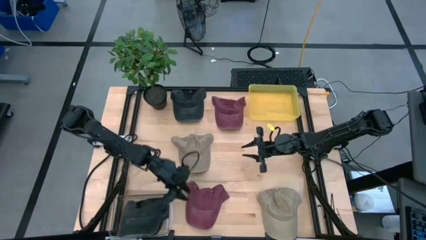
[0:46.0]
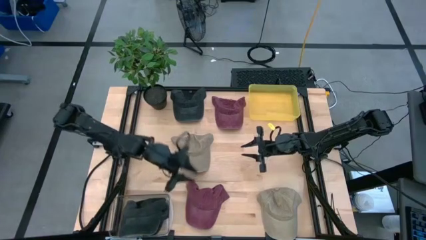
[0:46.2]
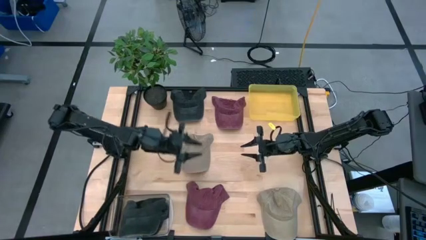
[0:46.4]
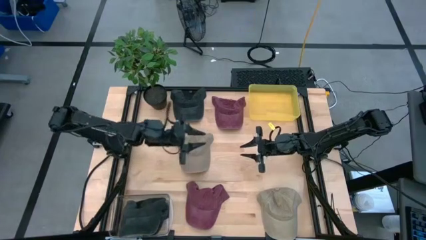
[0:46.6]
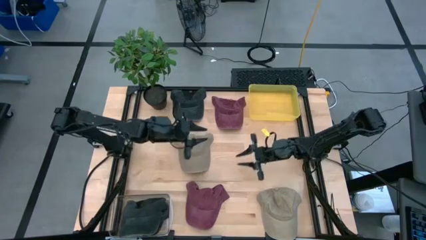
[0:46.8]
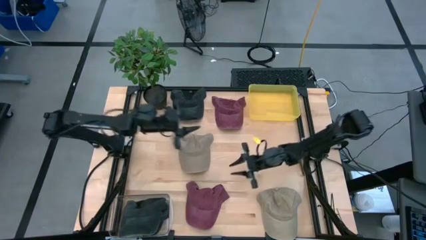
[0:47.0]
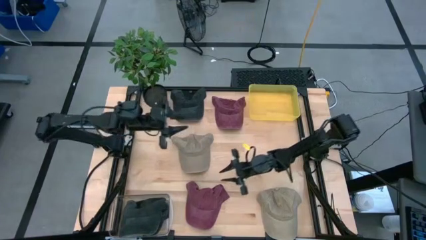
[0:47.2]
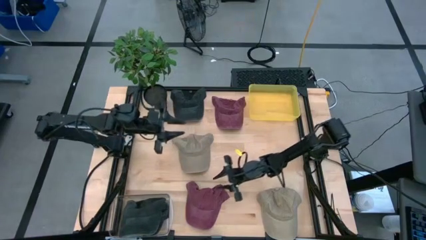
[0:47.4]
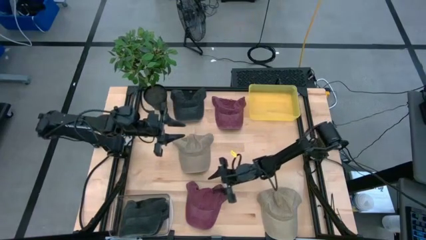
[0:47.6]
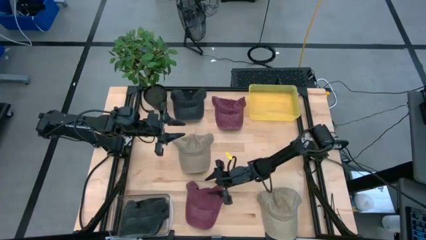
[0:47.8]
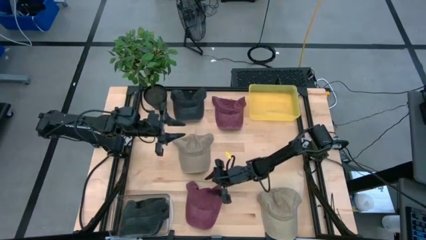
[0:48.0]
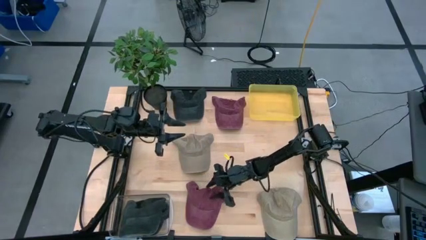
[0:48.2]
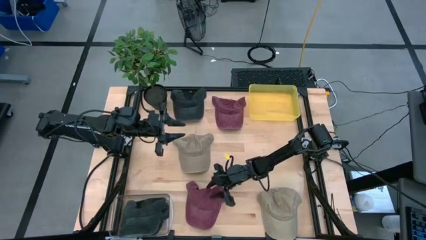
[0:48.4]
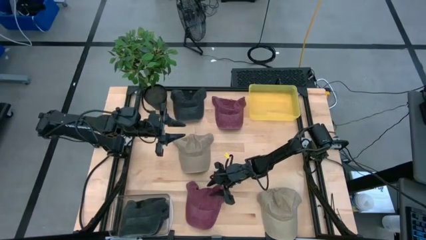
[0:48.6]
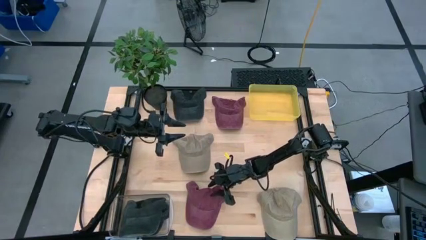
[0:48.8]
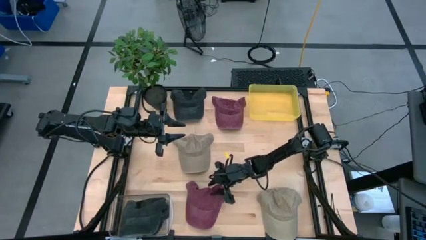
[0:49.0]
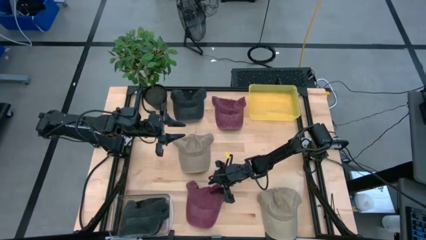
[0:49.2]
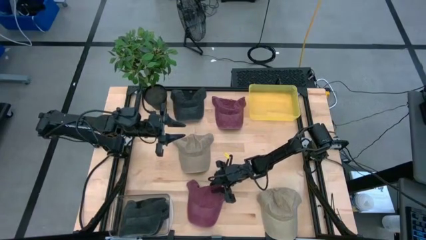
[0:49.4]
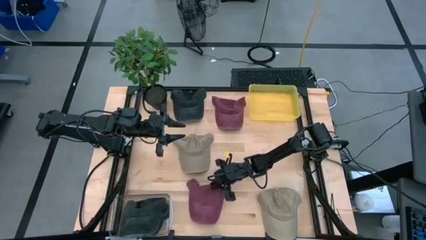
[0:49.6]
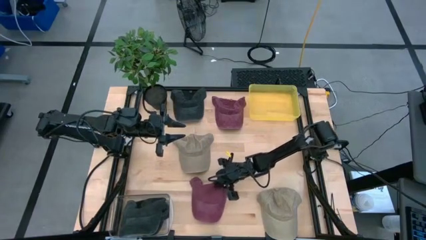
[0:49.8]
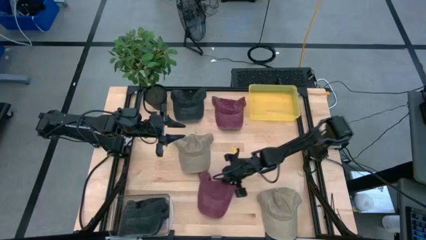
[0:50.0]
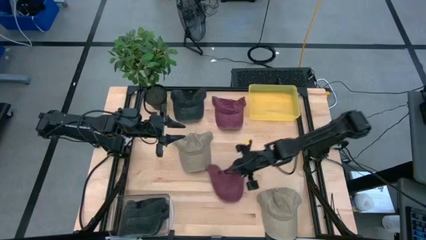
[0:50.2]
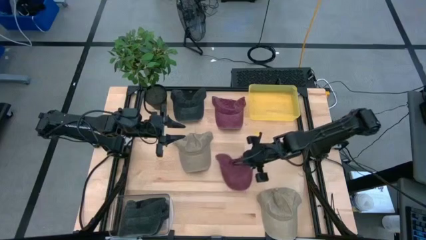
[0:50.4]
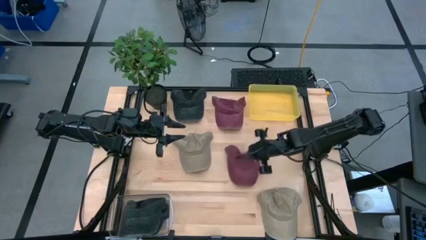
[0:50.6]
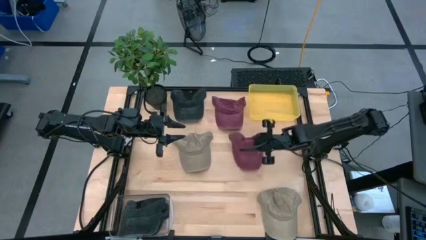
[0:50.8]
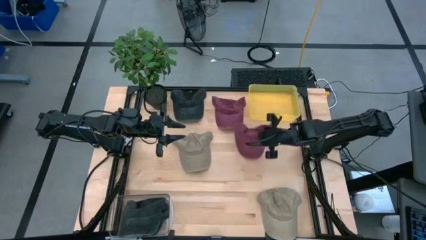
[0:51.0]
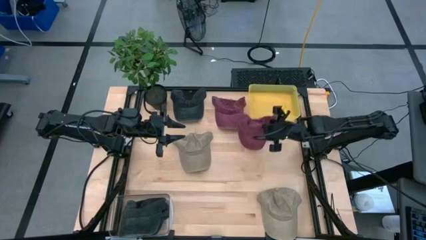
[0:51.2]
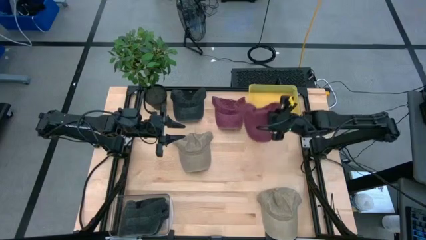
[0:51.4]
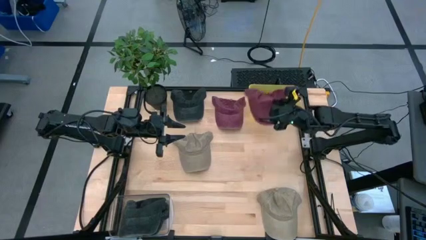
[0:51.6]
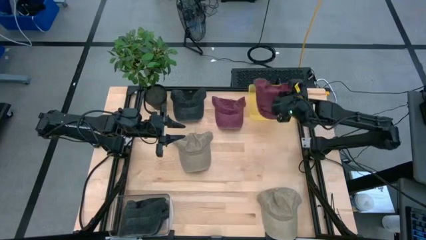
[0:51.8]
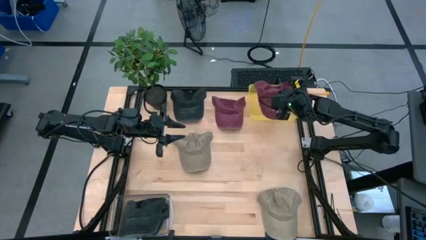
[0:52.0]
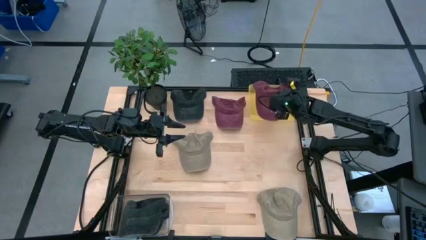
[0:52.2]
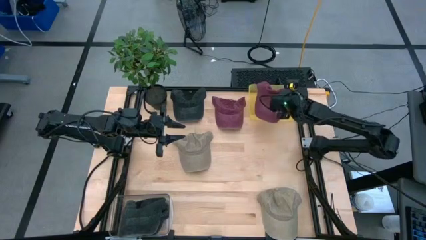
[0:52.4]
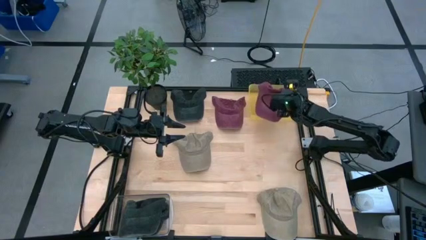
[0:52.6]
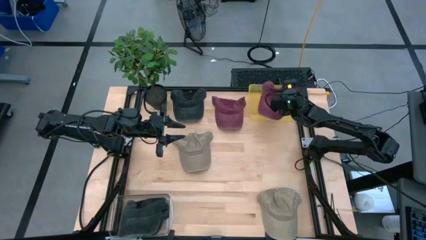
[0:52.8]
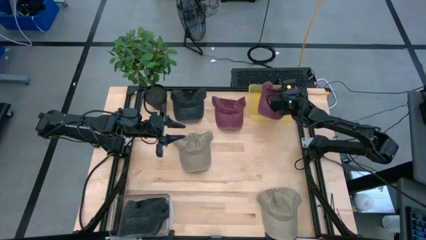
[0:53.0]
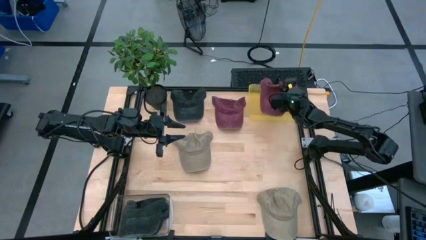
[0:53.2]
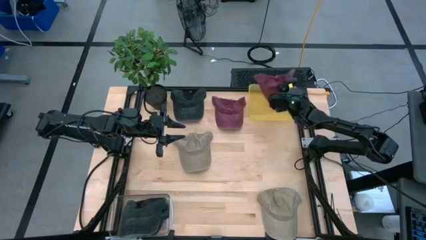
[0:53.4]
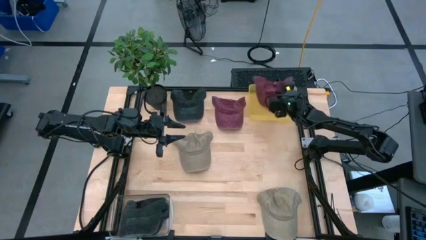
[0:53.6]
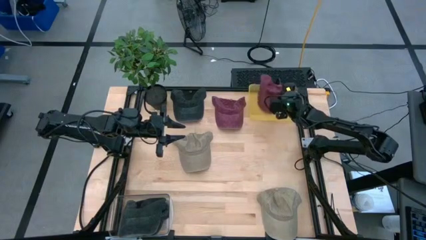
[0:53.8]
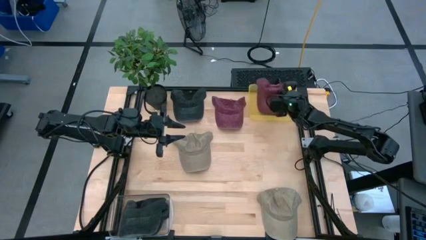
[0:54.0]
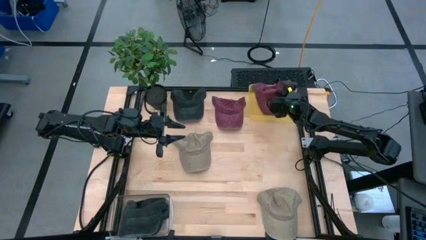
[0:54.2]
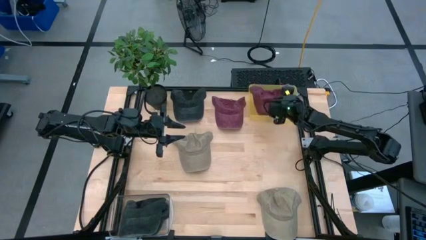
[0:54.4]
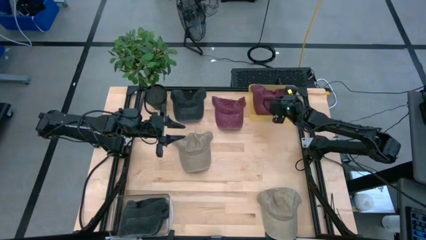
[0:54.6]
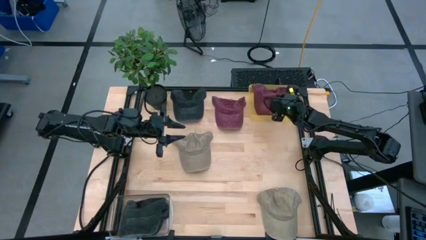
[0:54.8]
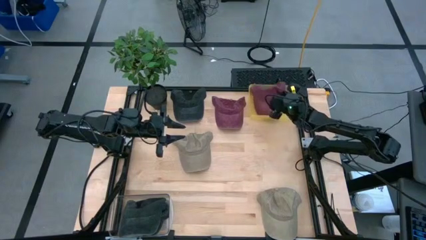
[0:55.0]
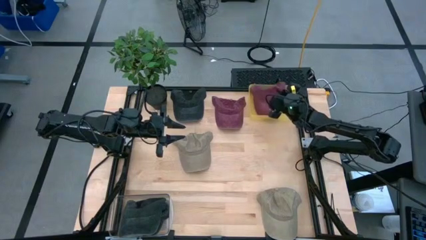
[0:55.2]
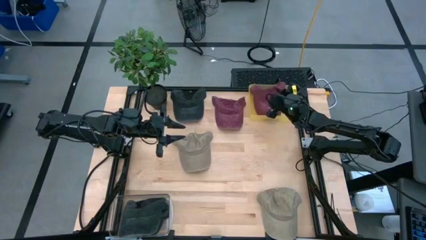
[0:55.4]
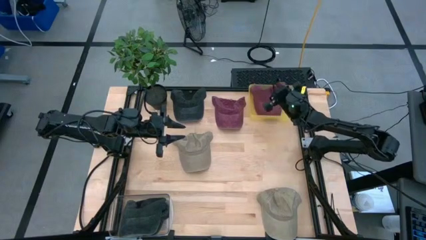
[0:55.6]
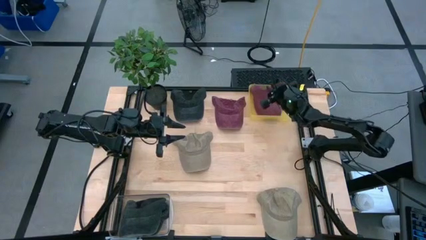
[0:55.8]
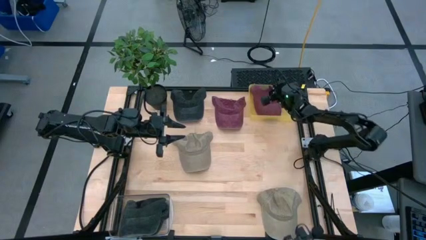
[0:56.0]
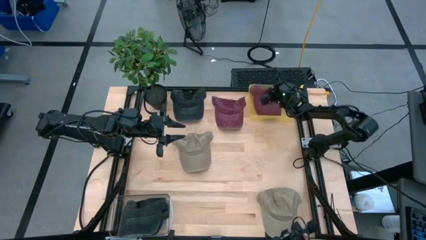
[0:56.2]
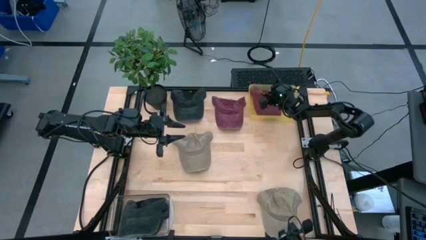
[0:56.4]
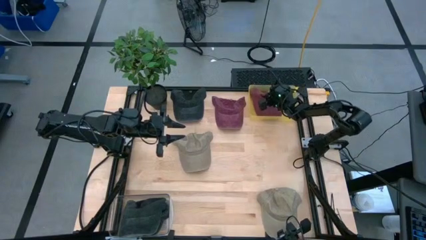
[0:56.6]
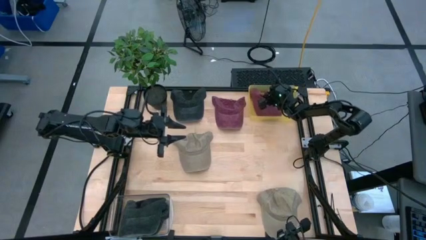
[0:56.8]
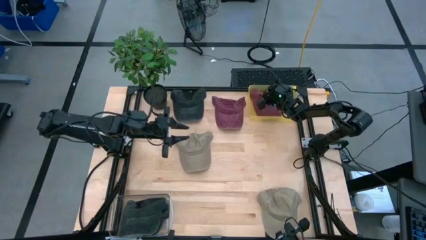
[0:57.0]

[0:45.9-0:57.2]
Task: Pick & Place hat
Put the bottom red cap into the yellow bin

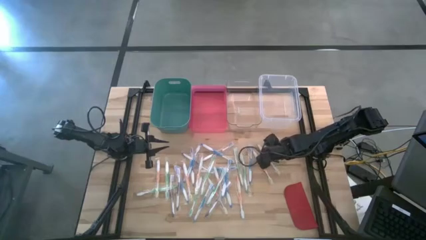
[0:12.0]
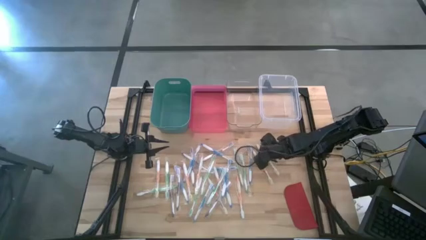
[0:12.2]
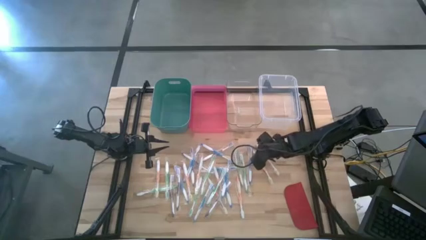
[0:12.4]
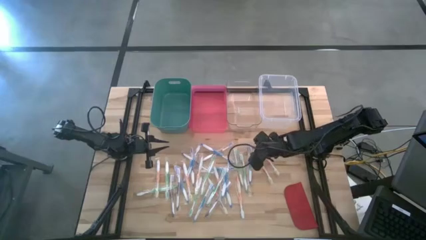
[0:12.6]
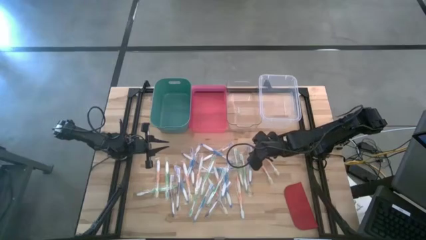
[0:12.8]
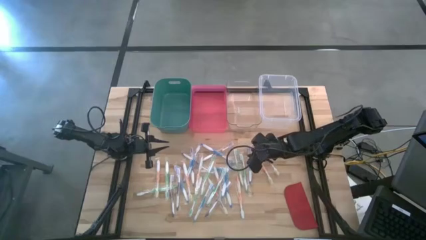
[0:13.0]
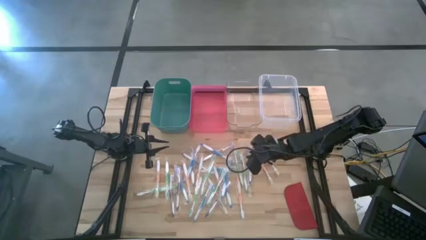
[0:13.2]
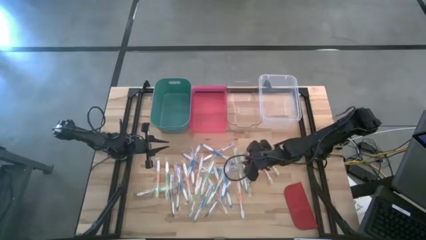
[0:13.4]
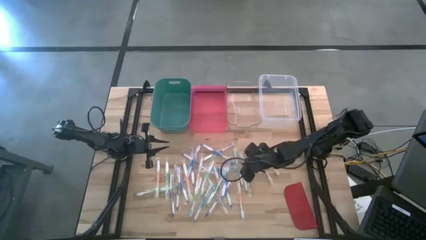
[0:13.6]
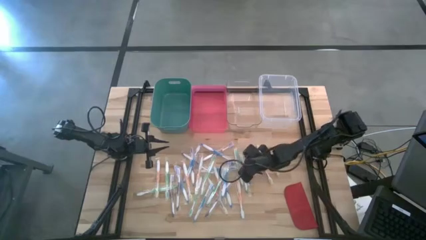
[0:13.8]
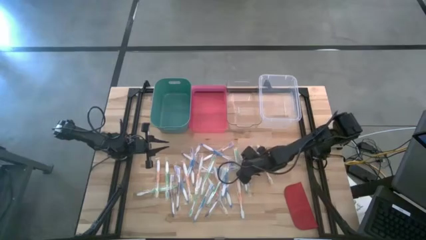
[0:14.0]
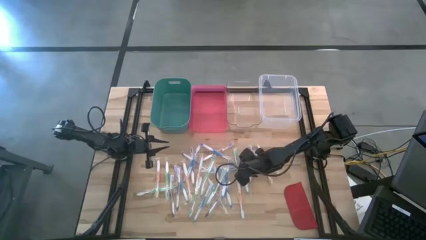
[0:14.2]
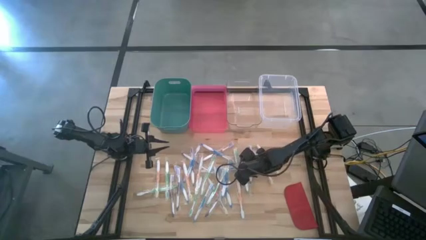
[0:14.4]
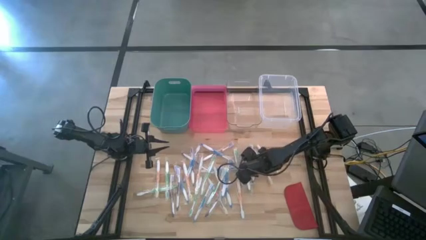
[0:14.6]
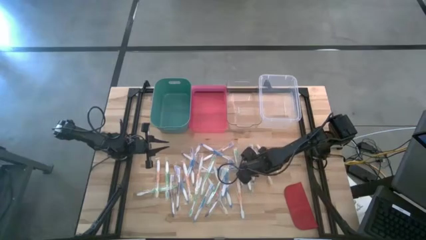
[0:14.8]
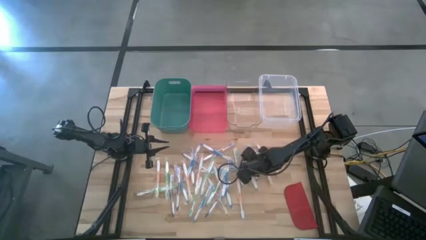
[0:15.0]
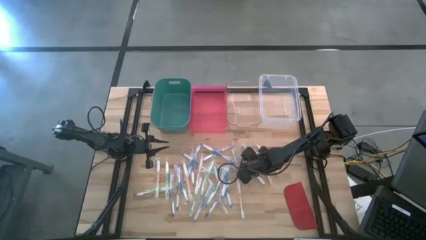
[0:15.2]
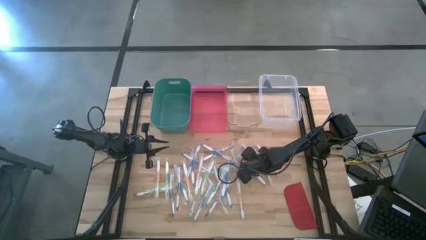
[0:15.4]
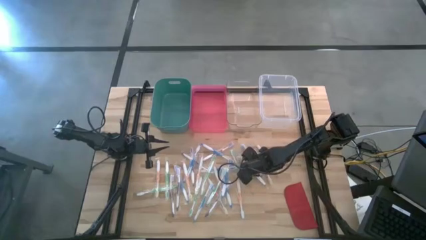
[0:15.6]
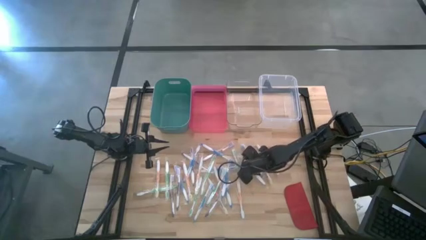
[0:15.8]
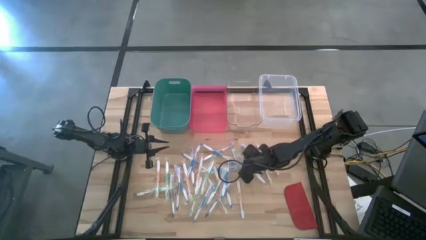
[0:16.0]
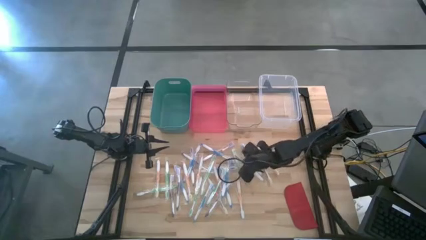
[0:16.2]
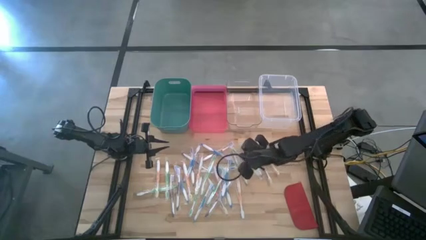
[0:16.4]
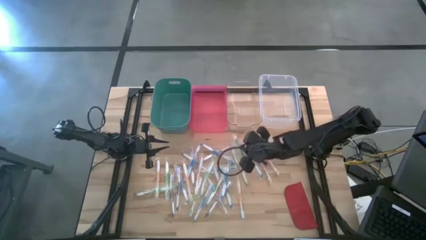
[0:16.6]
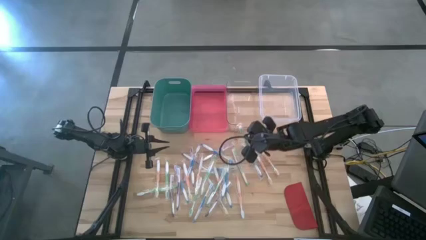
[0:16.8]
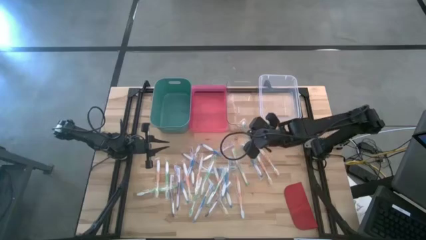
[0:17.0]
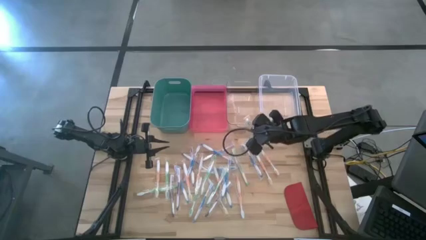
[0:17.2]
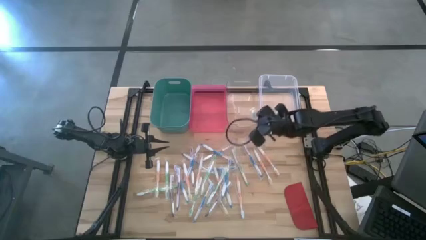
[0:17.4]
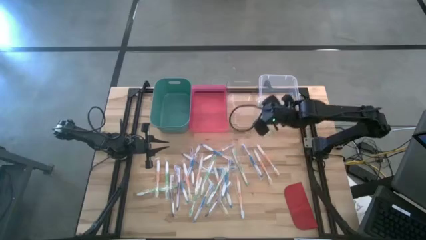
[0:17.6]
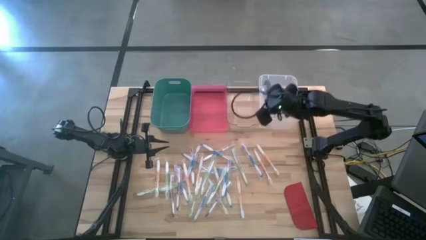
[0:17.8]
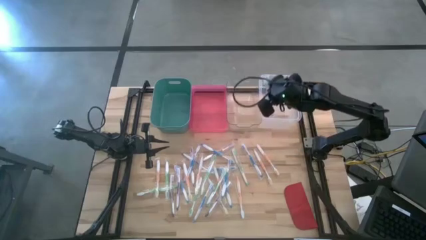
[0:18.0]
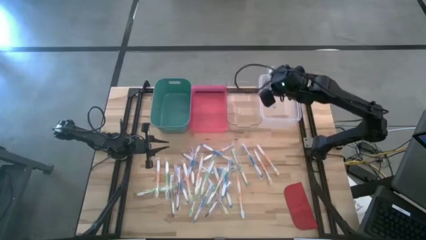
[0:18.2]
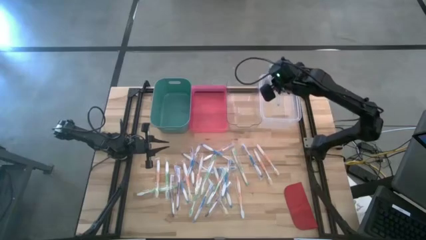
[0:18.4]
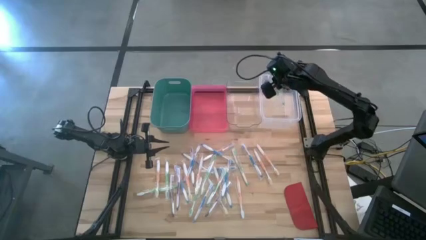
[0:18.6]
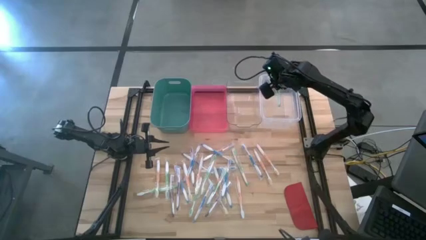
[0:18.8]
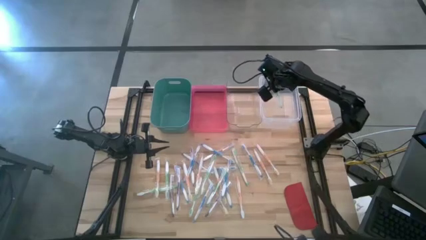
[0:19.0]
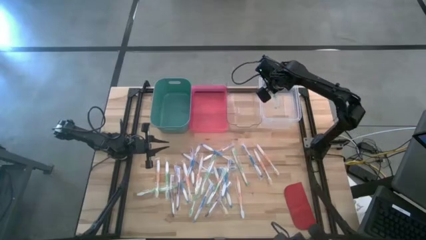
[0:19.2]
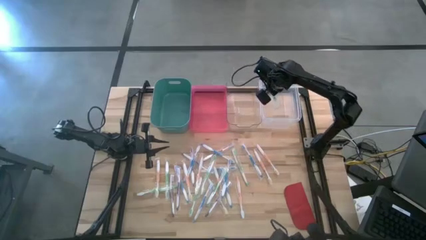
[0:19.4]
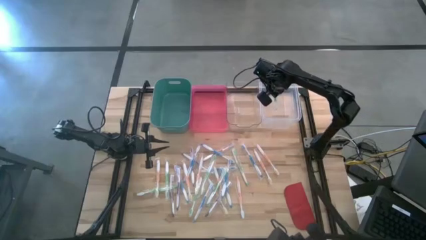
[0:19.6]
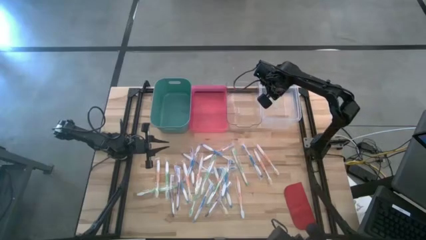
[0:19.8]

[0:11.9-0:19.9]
Task: Pick & Place Toothbrushes
Put the green toothbrush into the white bin
